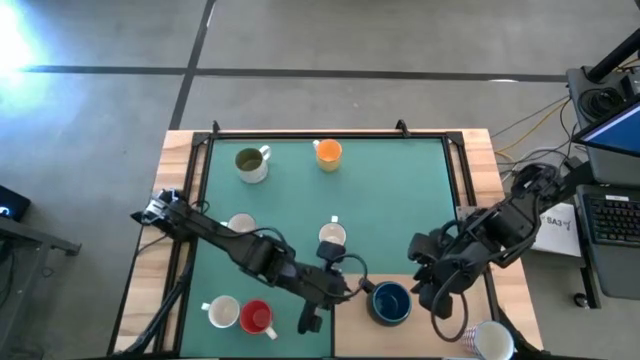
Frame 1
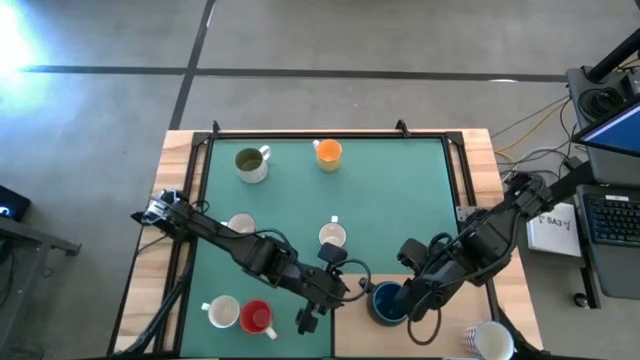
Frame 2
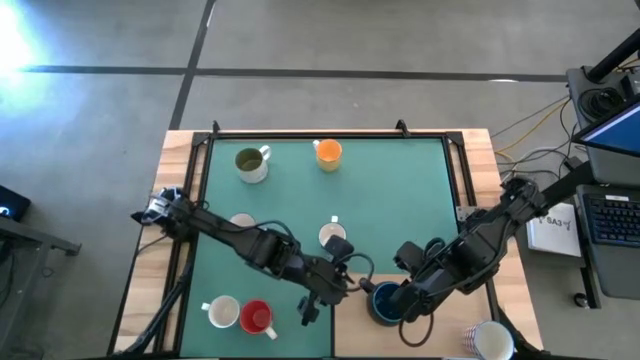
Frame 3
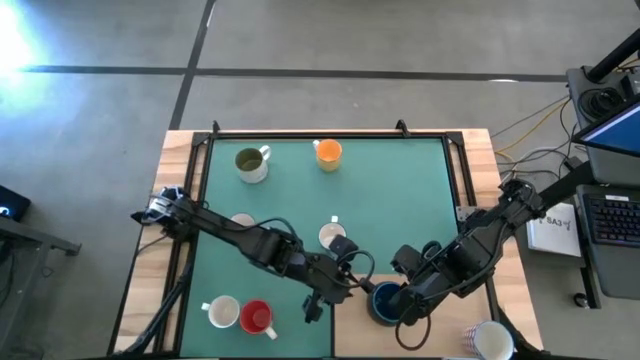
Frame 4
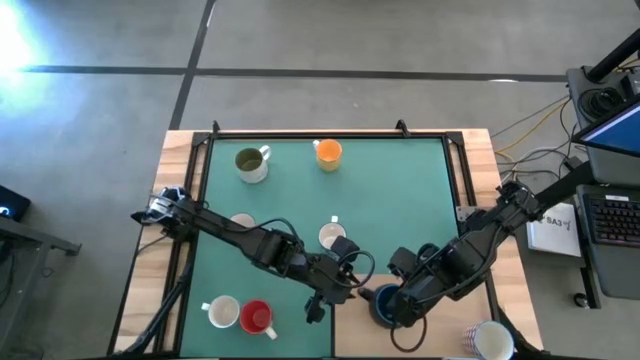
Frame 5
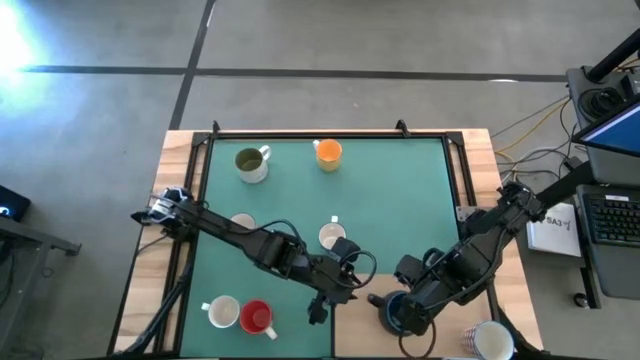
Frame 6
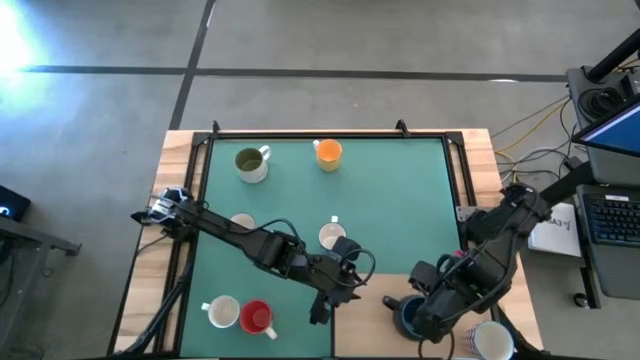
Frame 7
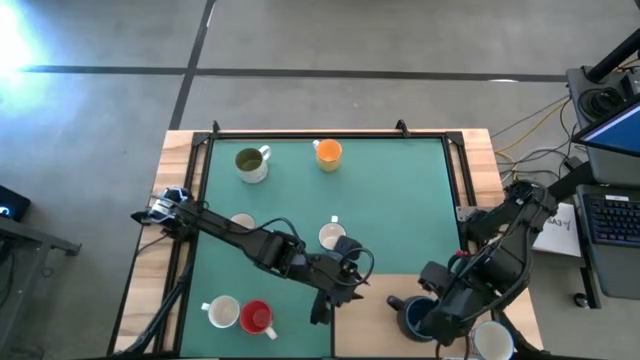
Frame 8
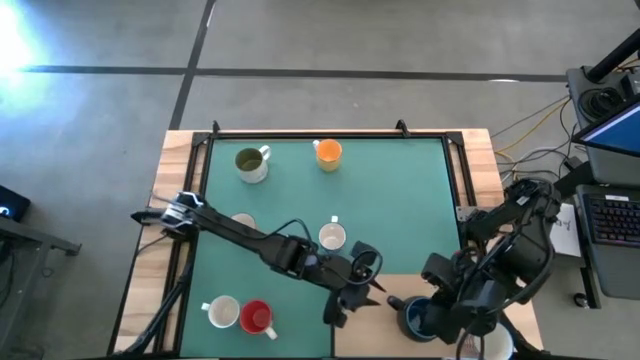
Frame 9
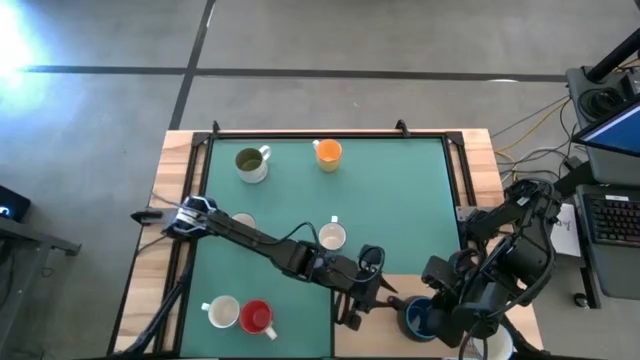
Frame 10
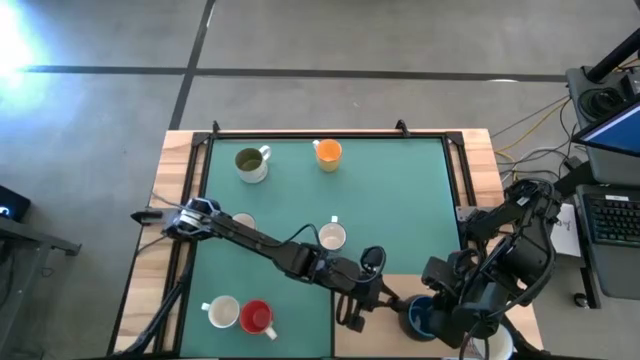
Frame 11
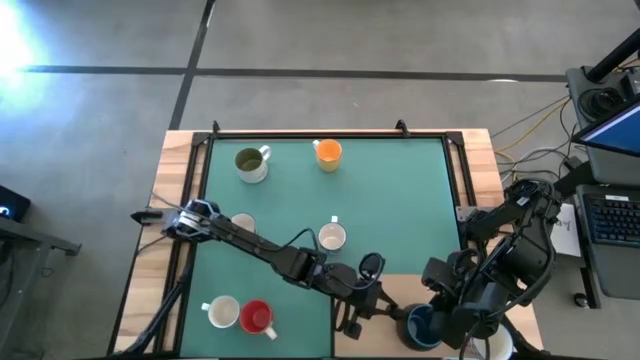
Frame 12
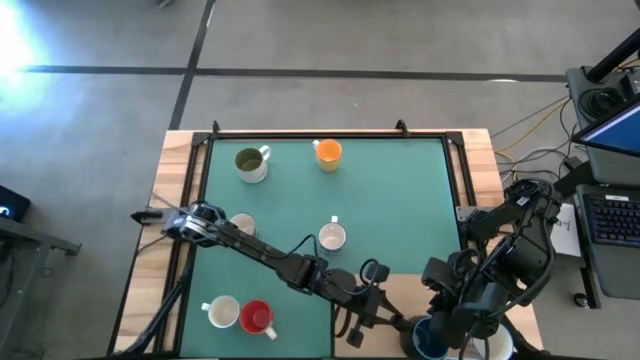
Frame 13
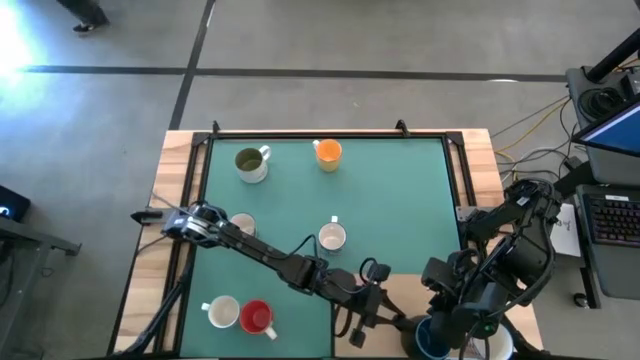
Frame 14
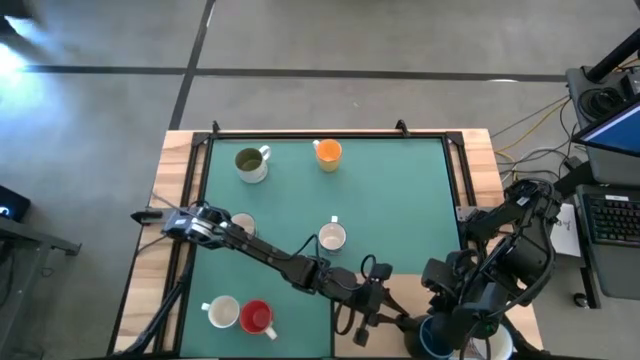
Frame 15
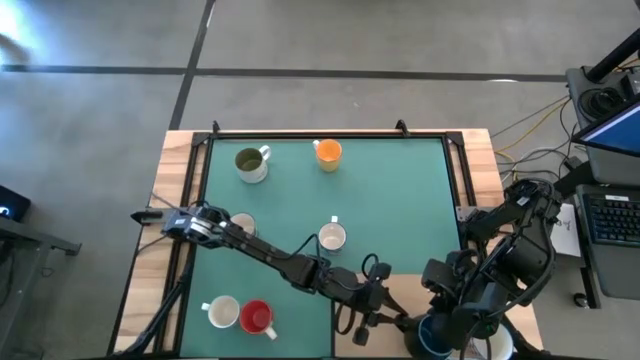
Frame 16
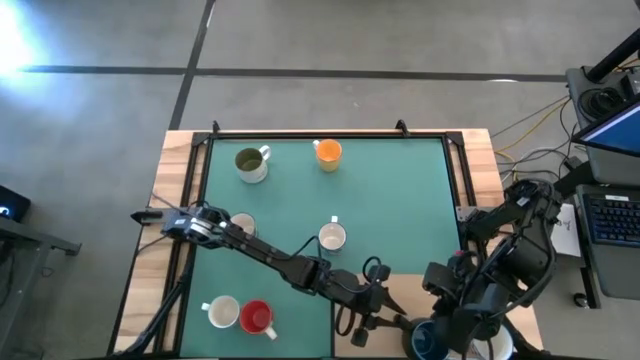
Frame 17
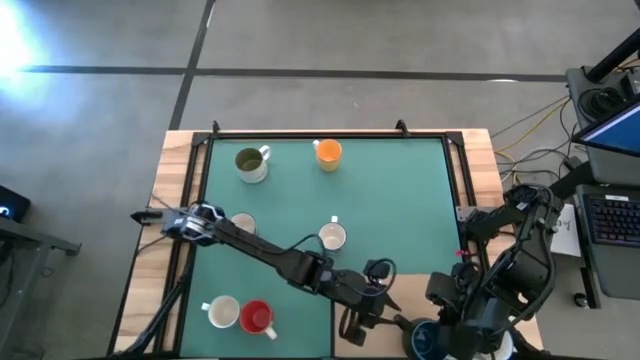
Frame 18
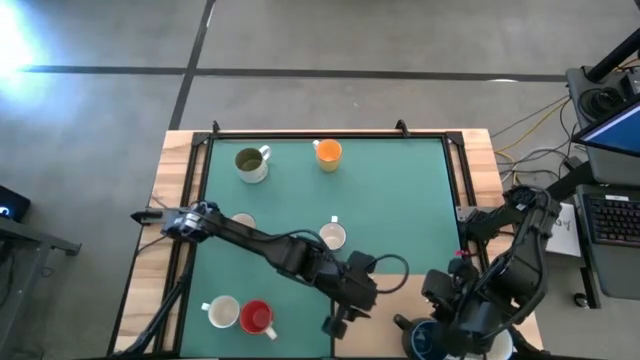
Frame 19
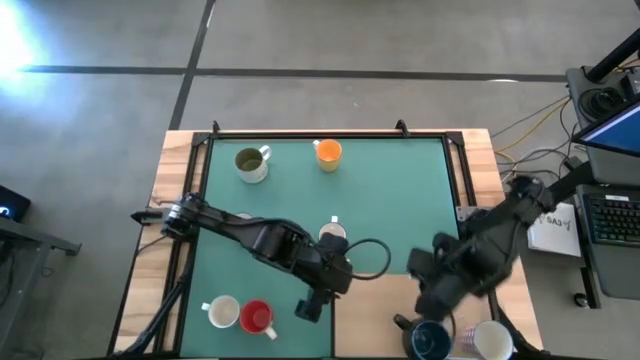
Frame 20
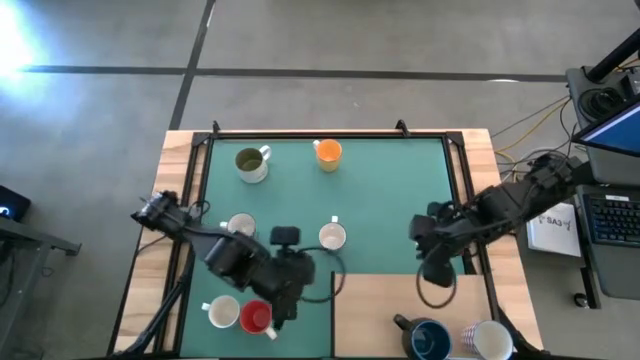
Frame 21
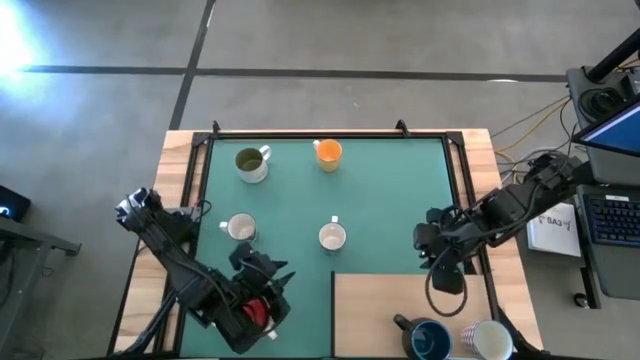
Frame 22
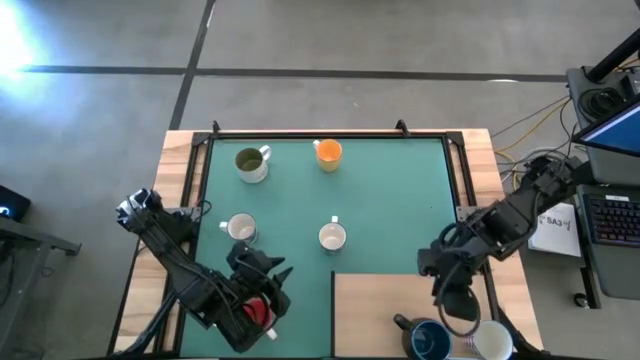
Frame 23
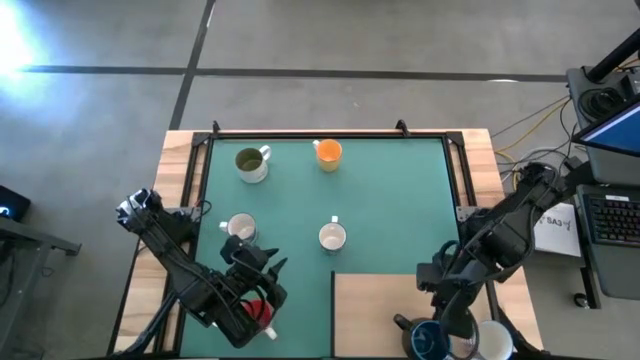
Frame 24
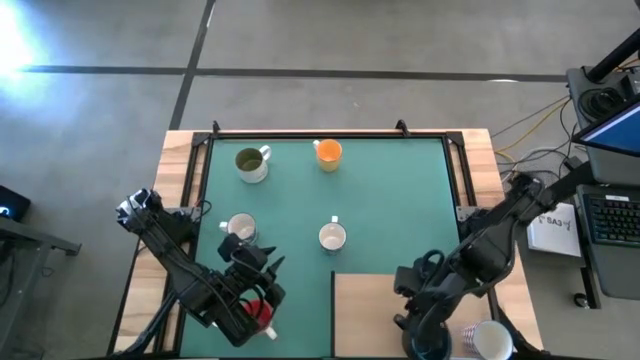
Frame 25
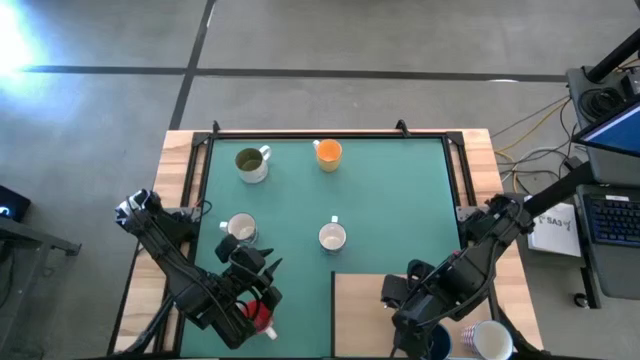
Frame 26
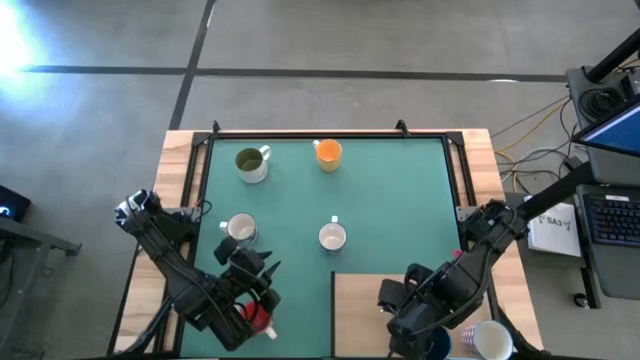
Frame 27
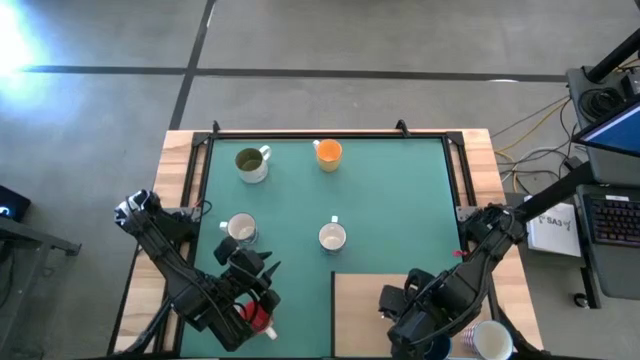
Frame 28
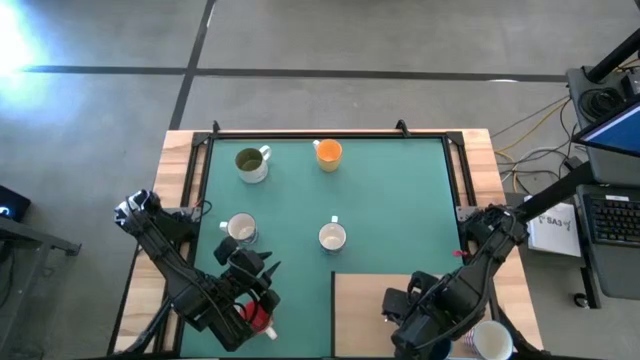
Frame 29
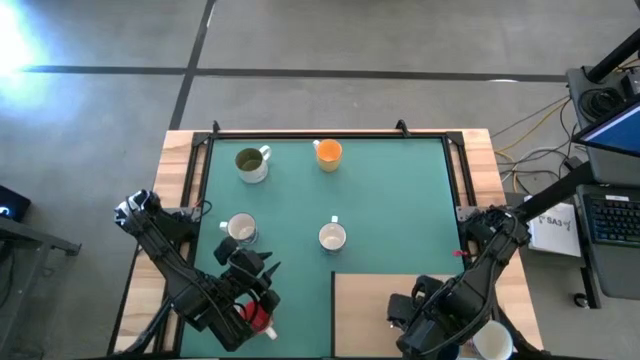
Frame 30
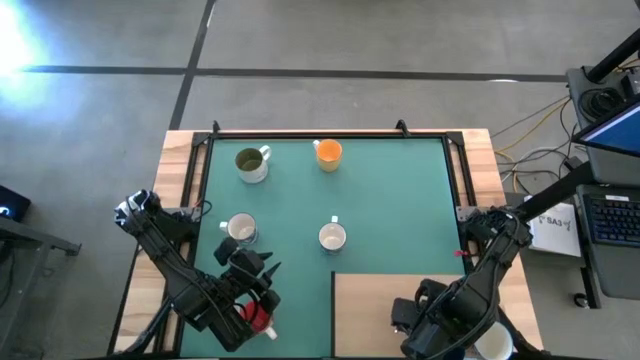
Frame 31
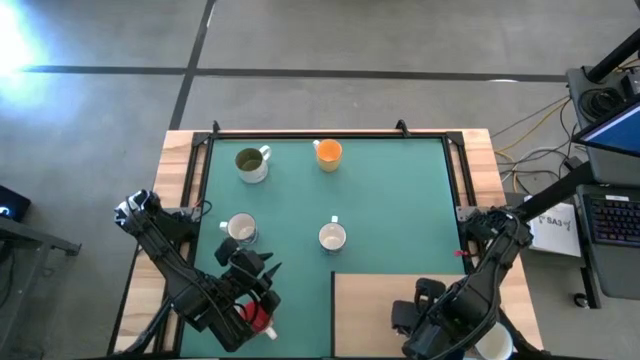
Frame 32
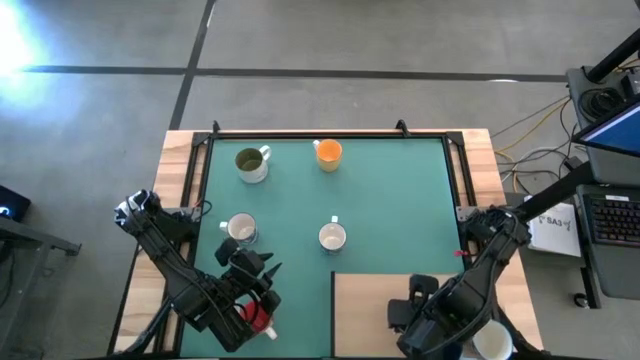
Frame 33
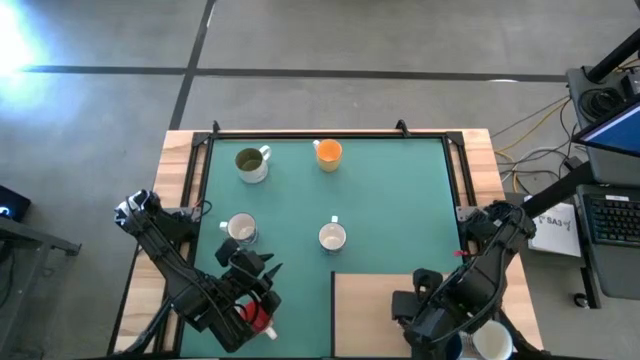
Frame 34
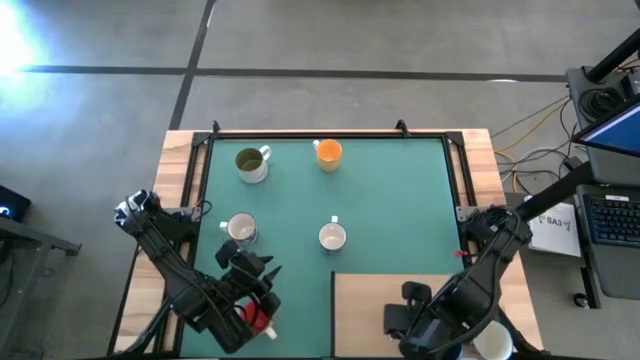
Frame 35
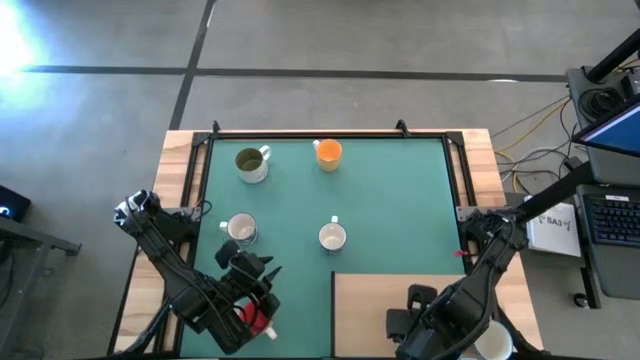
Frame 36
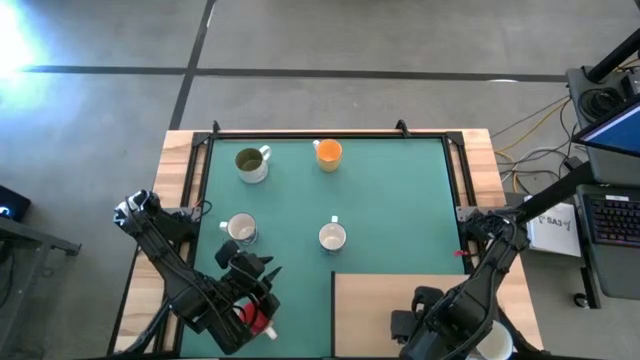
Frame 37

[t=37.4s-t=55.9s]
Task: Place coffee mugs
Put the black mug on the shelf
